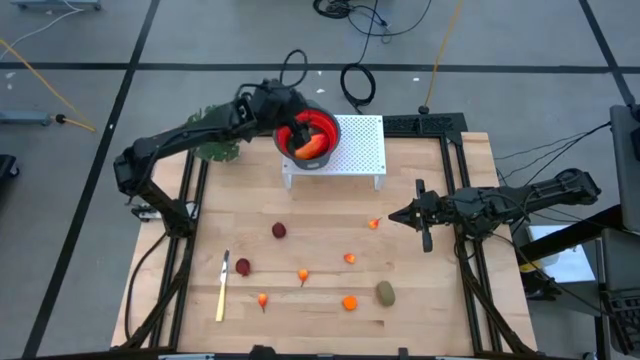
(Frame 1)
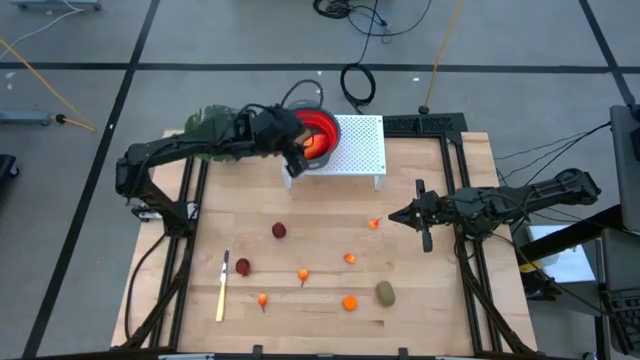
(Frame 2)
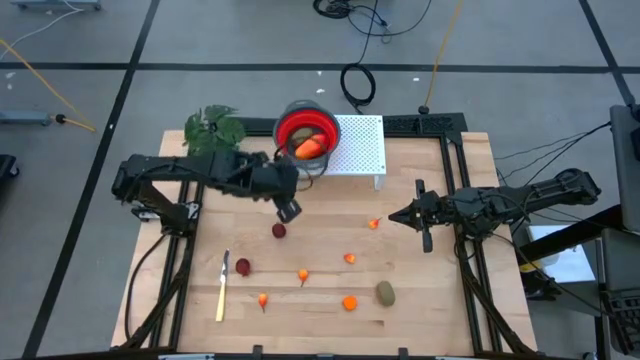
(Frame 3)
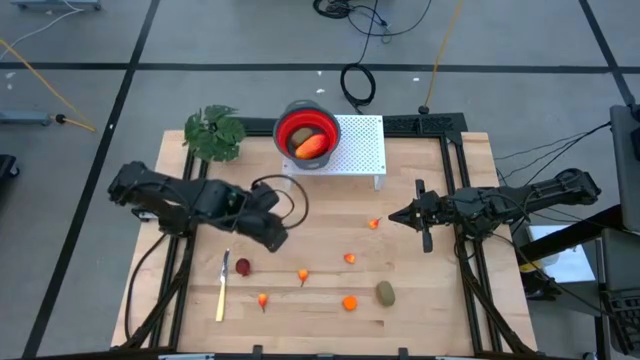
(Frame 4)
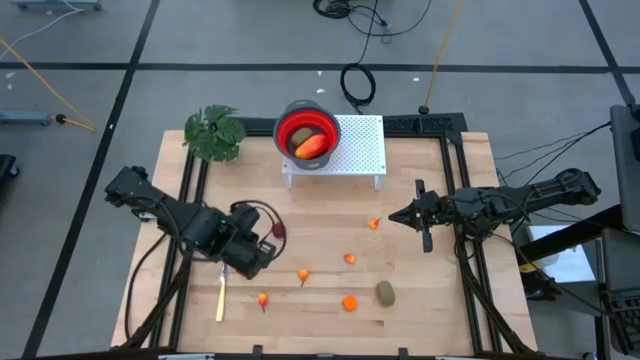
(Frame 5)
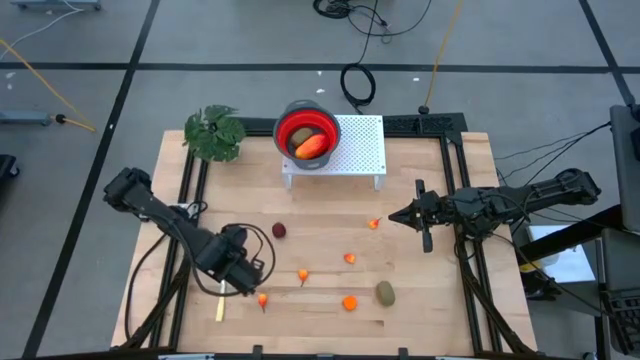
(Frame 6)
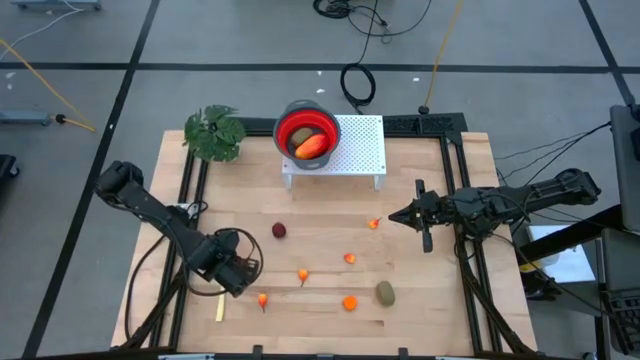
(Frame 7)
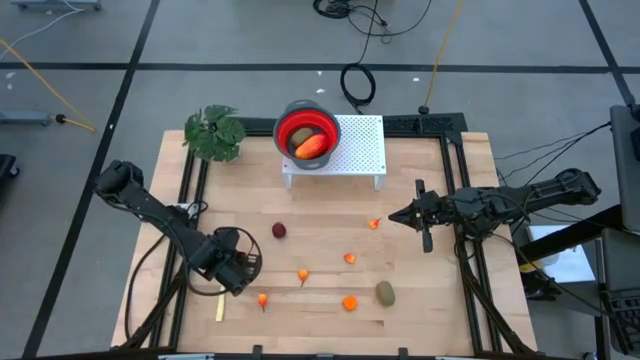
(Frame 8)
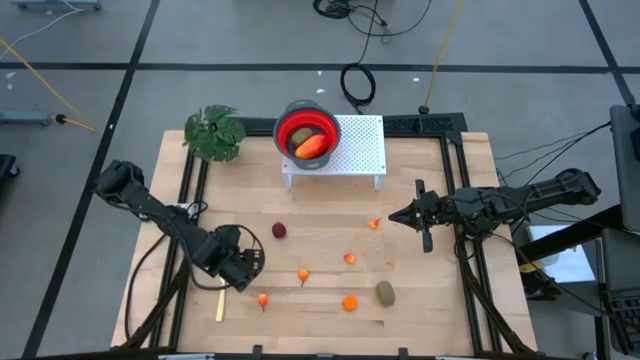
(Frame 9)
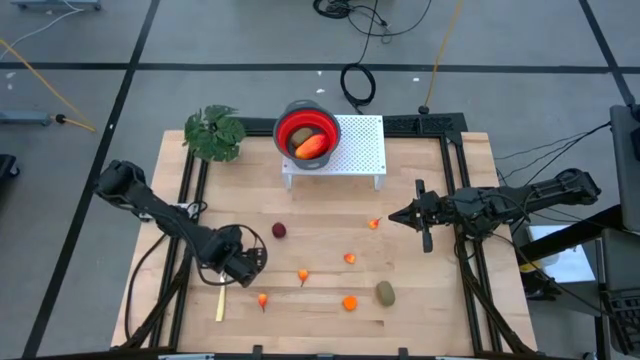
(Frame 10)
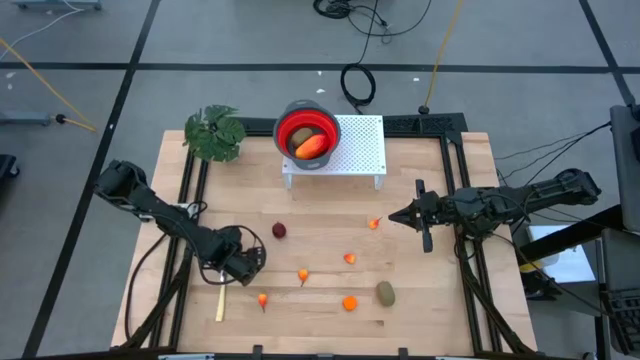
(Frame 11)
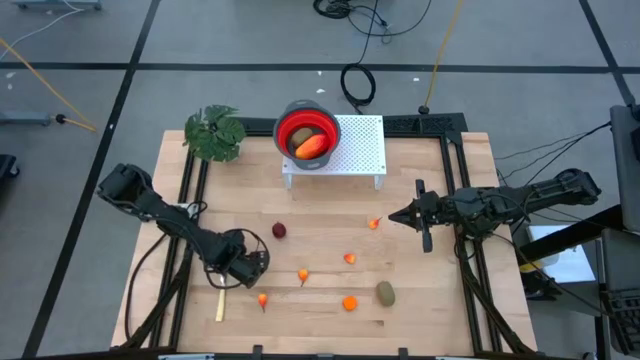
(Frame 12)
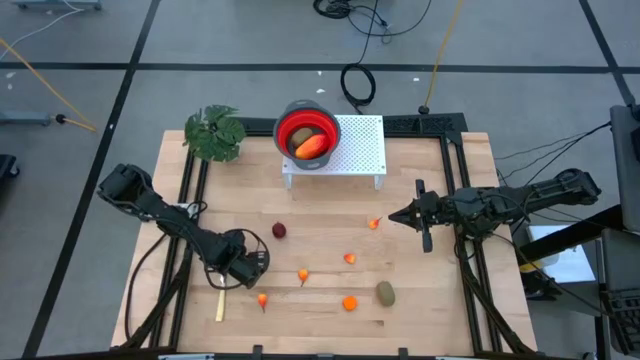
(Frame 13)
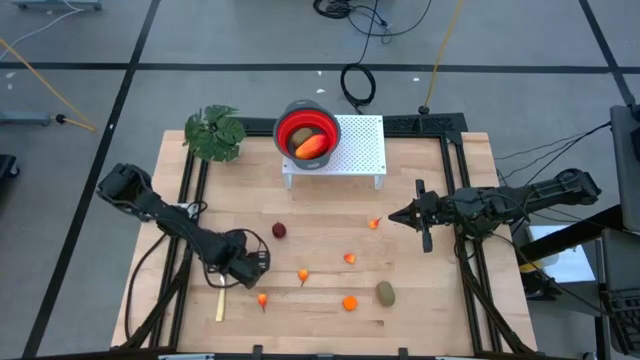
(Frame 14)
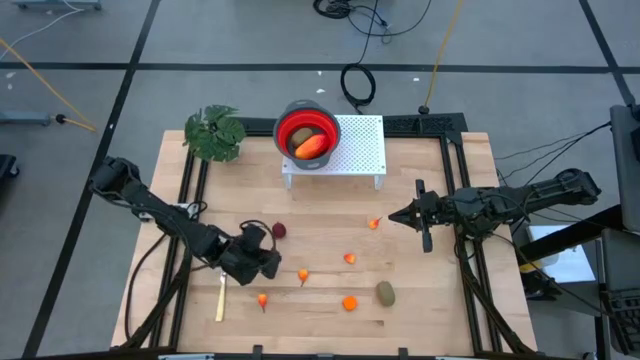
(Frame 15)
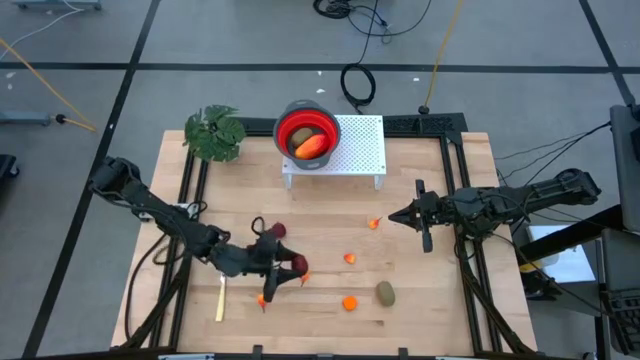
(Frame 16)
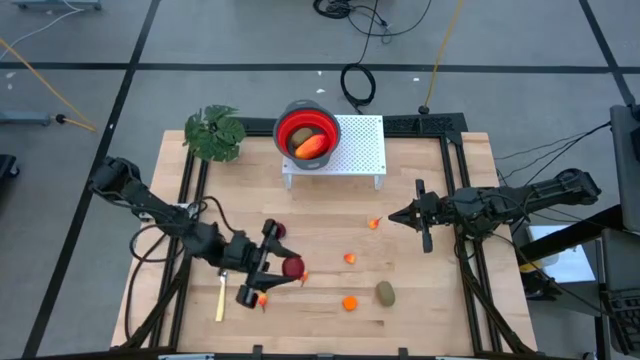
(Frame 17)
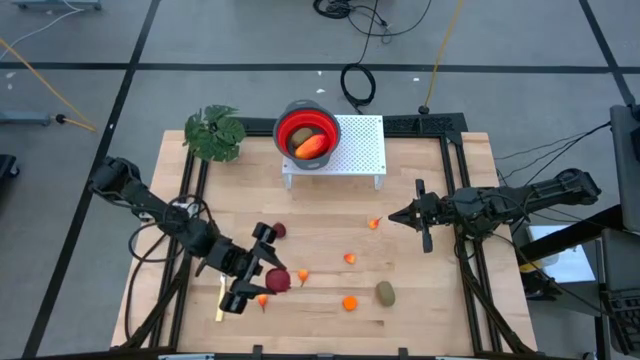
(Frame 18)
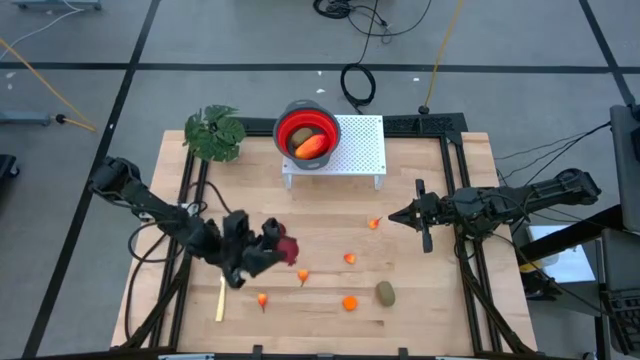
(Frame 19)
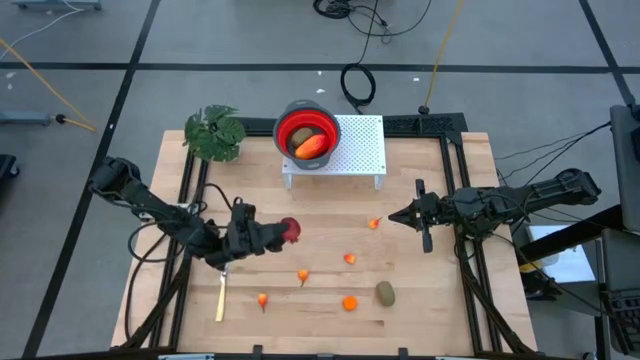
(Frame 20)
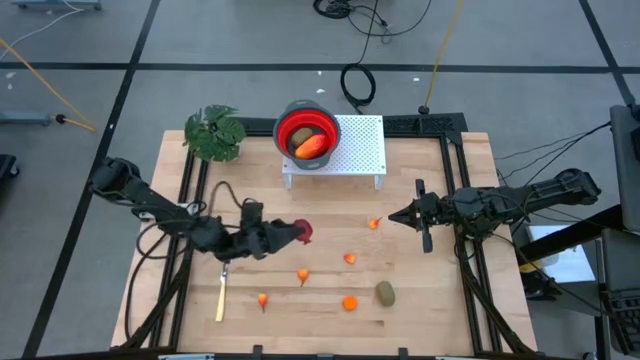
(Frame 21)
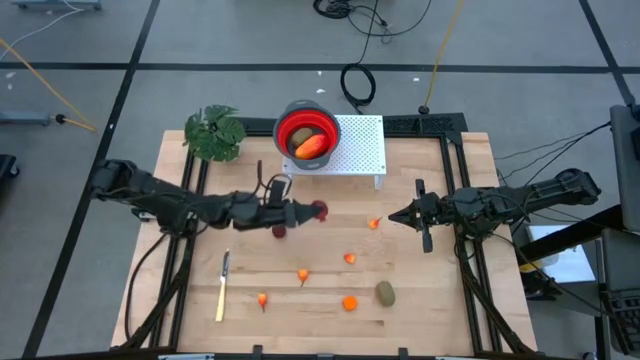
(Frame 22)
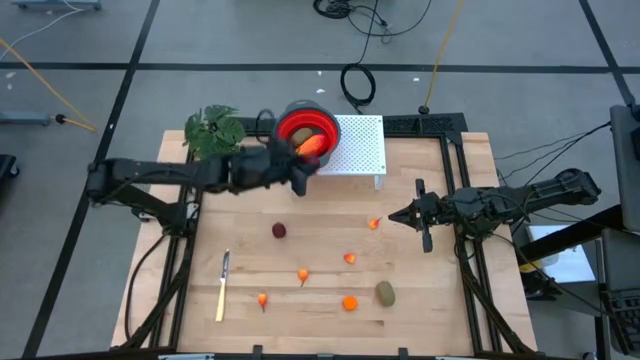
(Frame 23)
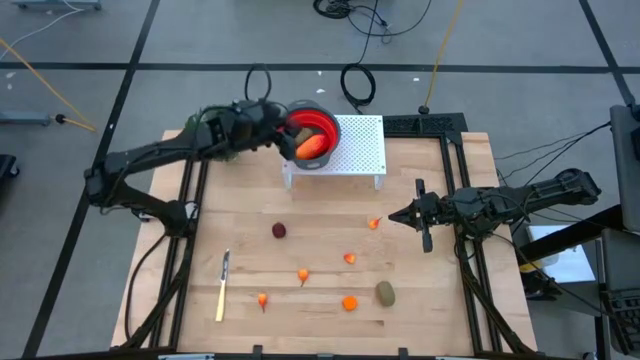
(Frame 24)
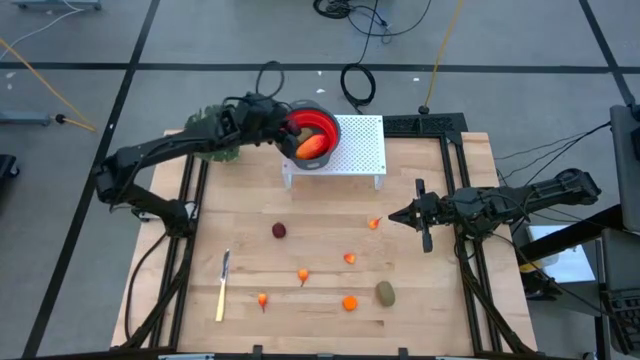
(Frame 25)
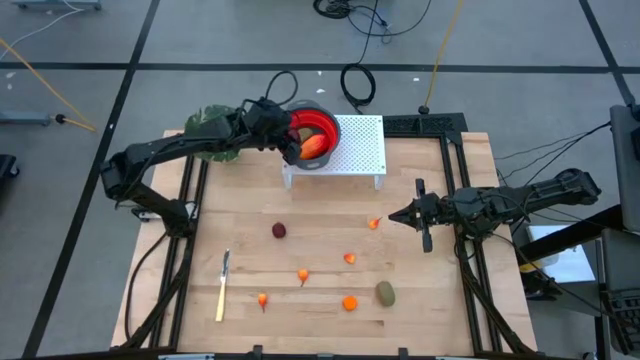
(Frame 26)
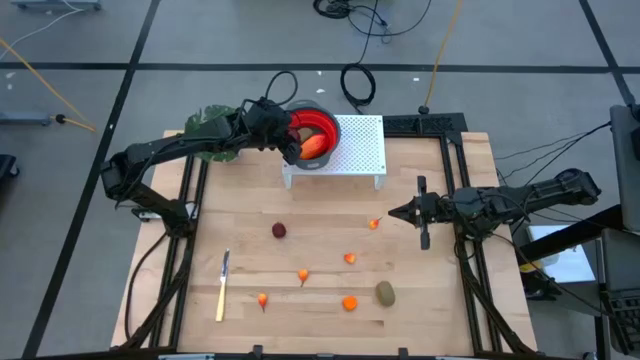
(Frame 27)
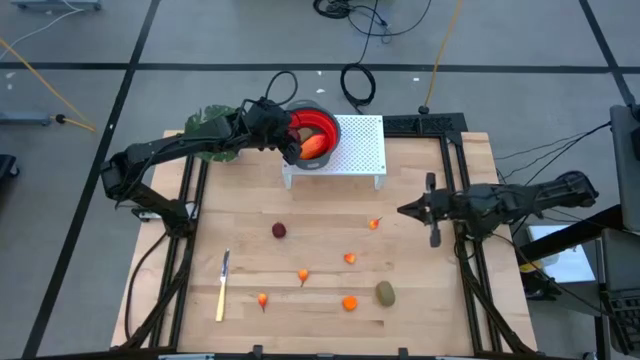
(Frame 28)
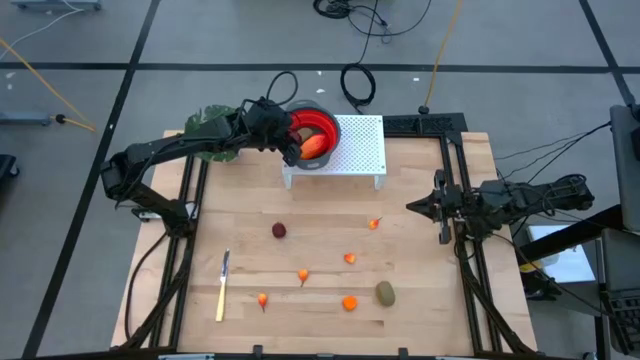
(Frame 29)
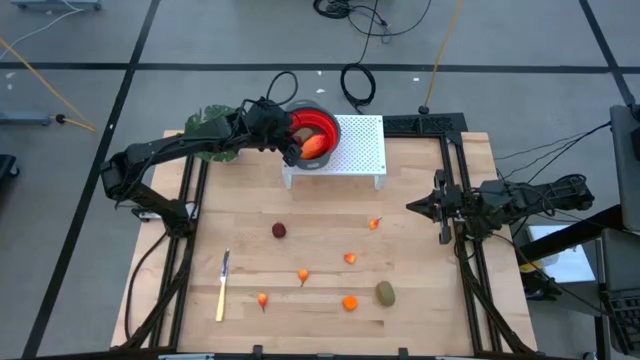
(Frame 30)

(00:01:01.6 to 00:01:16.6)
Task: Pick & Place Fruit
Put the pomegranate into the red strainer bowl on the shelf

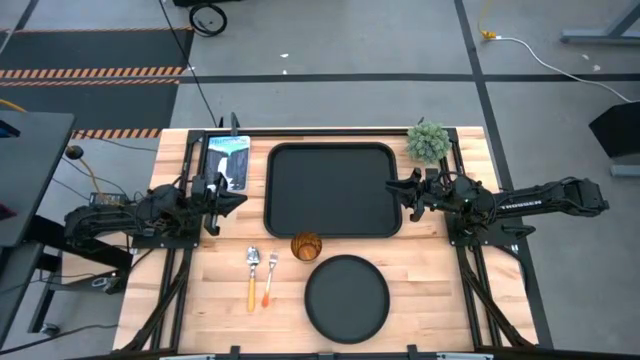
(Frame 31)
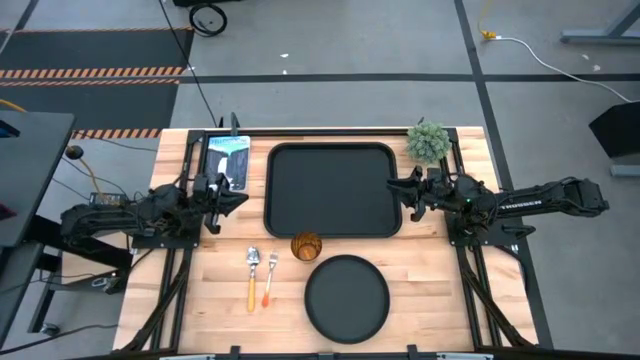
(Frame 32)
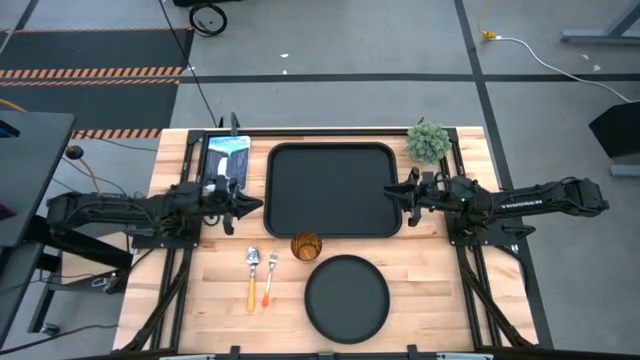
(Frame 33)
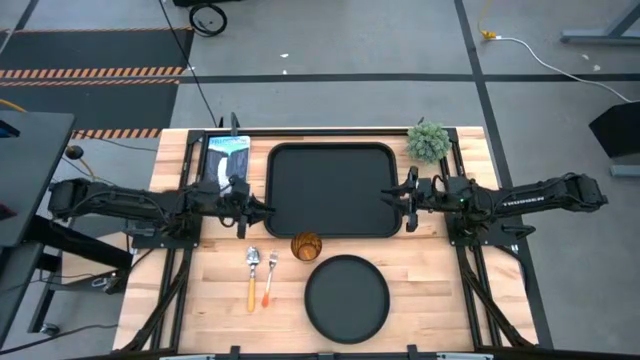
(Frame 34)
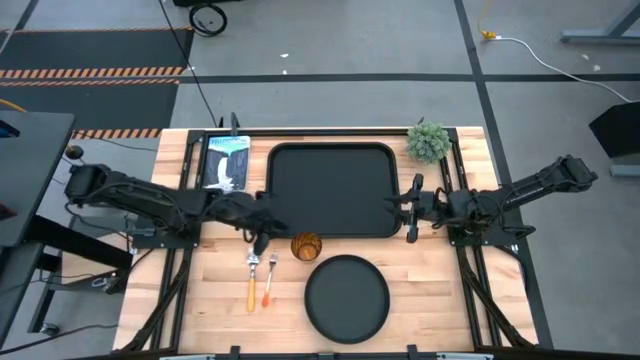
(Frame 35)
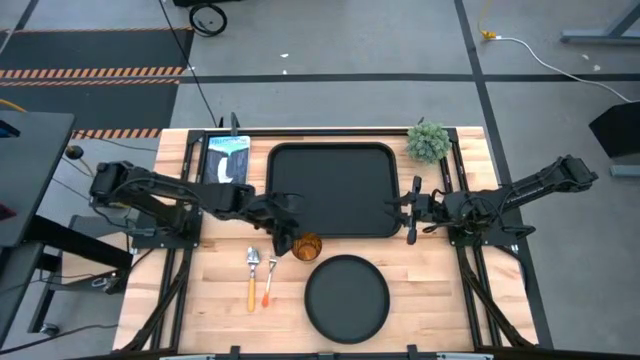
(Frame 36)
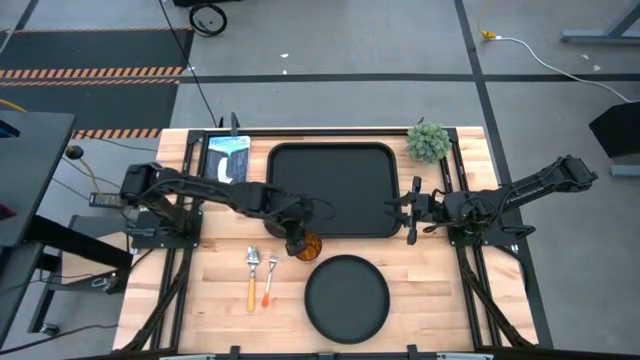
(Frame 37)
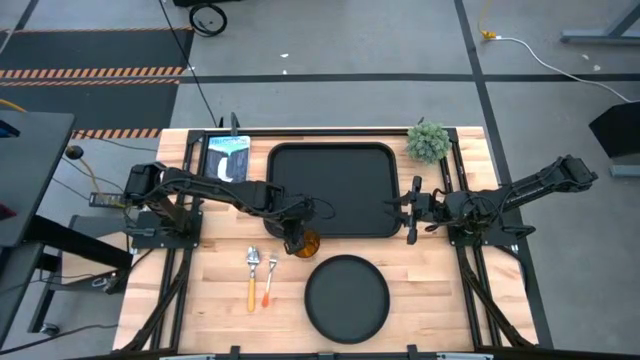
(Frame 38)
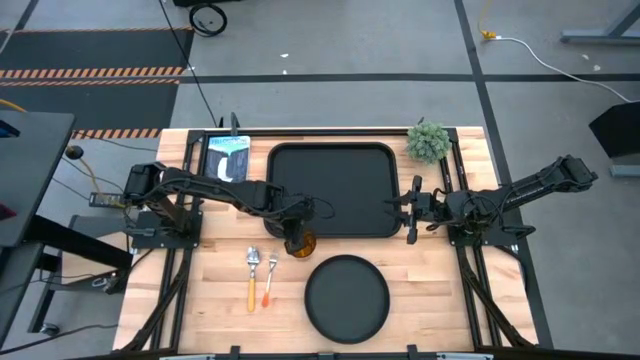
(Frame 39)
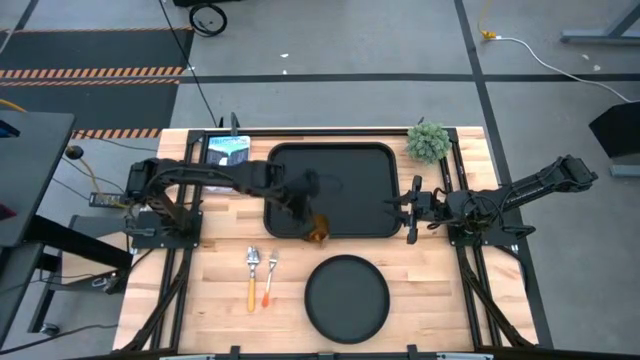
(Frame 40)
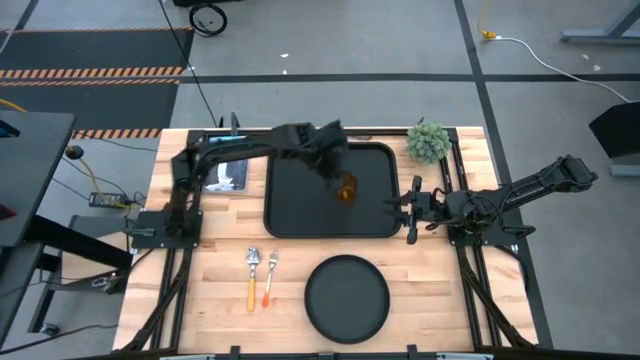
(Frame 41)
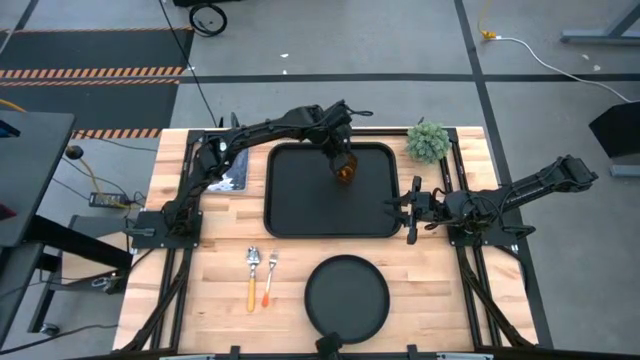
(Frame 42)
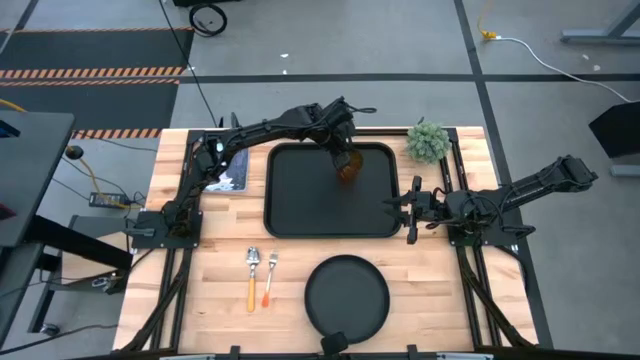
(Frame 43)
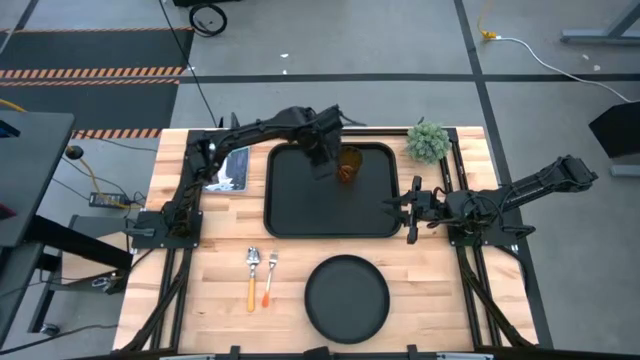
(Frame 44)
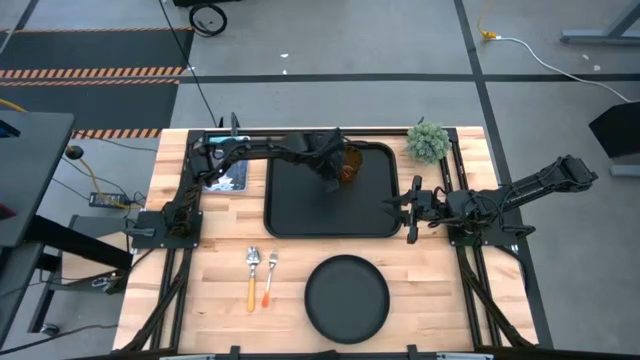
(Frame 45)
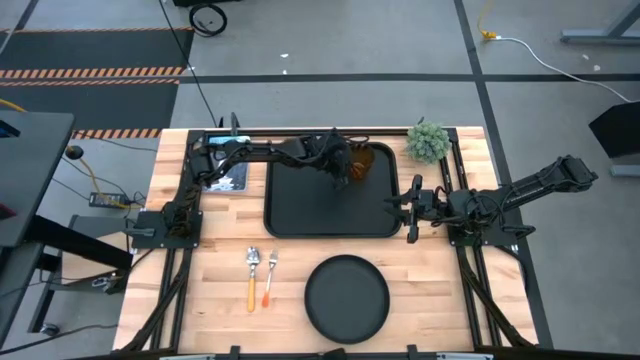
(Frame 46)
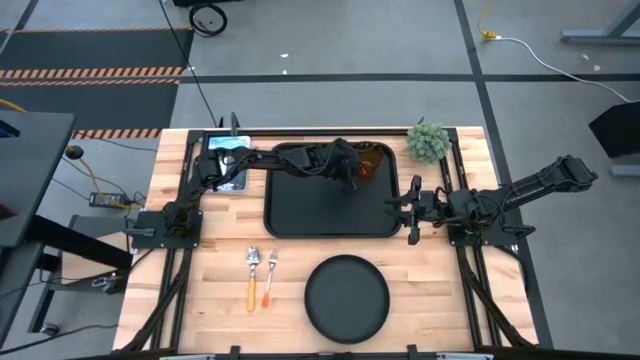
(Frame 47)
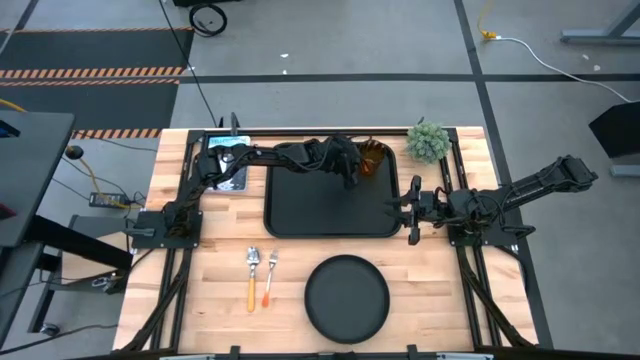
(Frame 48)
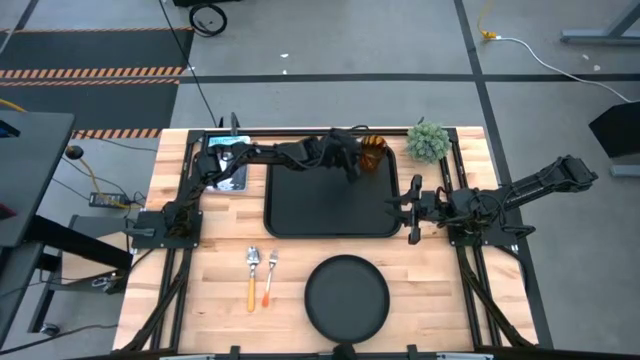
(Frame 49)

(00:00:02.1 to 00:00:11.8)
Task: Pick and place plate/cup/fork/spoon on tray
Put the brown glass on the black serving tray
